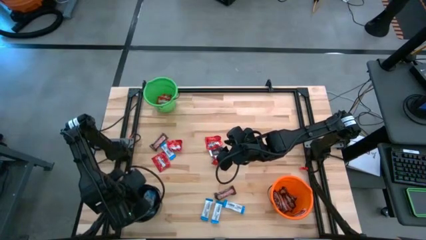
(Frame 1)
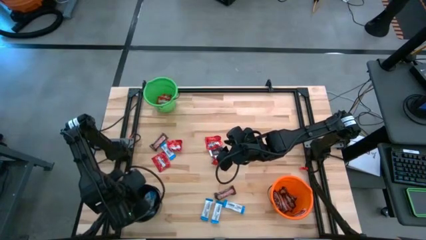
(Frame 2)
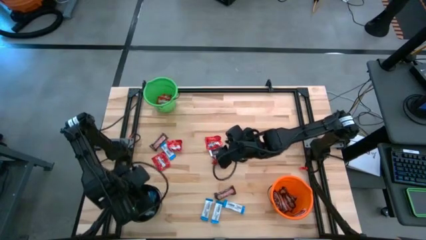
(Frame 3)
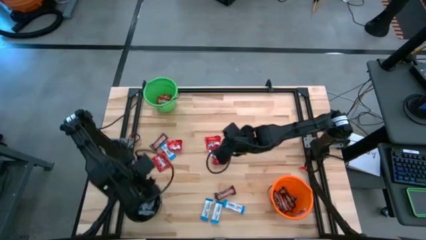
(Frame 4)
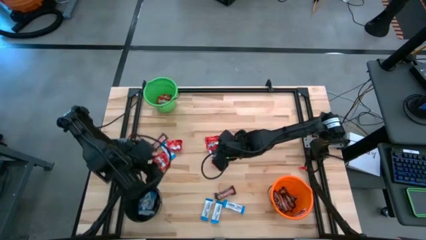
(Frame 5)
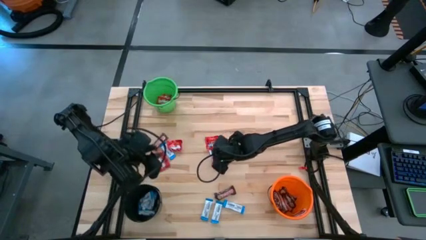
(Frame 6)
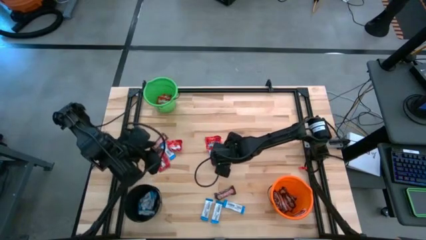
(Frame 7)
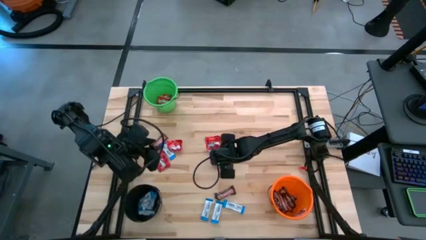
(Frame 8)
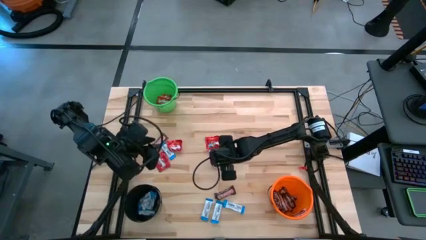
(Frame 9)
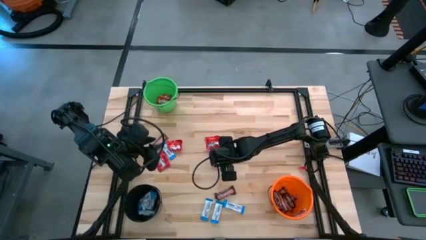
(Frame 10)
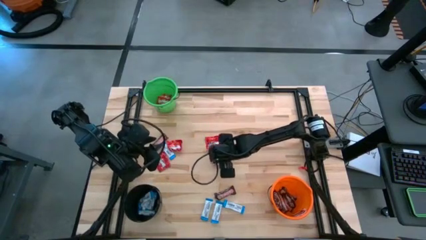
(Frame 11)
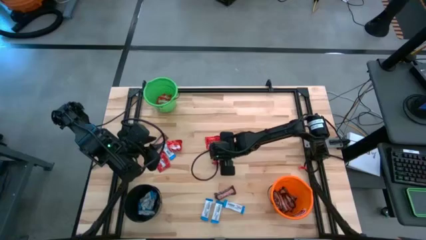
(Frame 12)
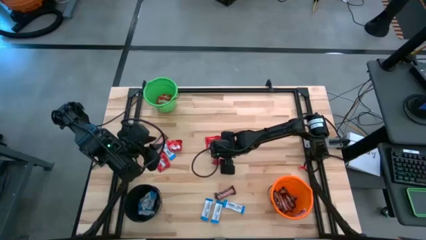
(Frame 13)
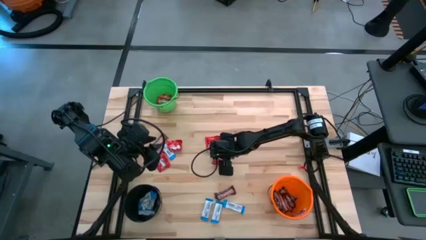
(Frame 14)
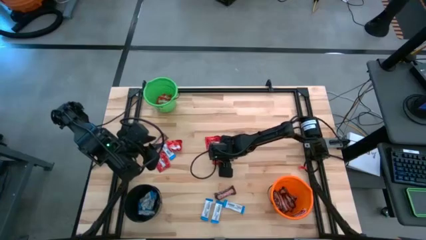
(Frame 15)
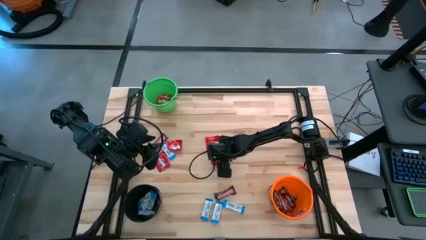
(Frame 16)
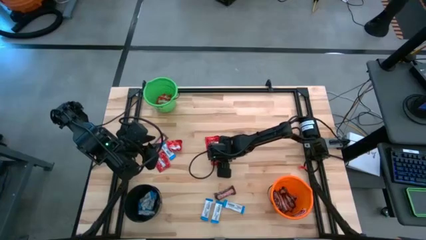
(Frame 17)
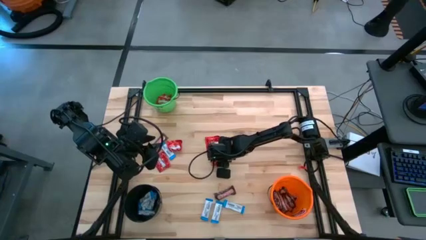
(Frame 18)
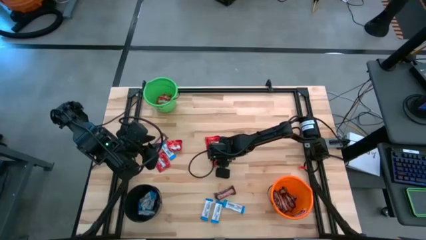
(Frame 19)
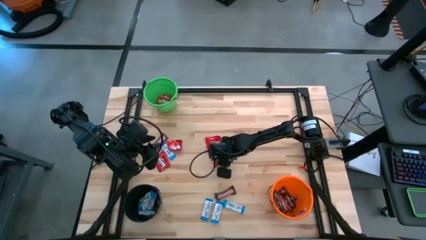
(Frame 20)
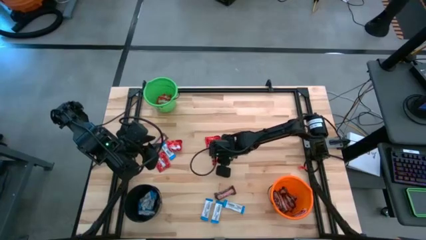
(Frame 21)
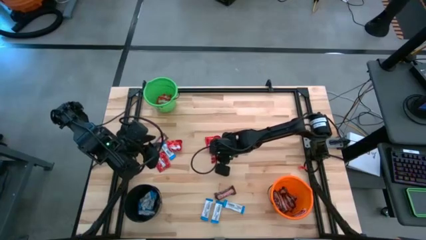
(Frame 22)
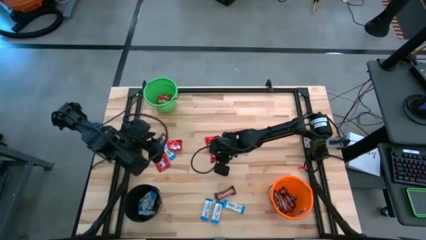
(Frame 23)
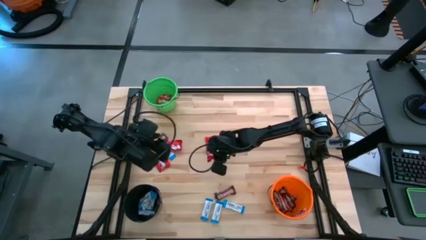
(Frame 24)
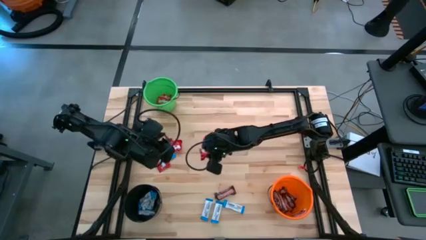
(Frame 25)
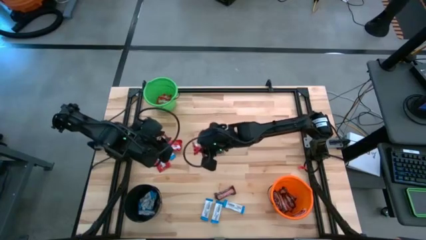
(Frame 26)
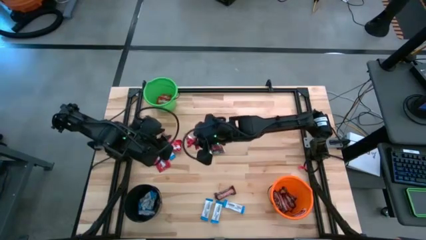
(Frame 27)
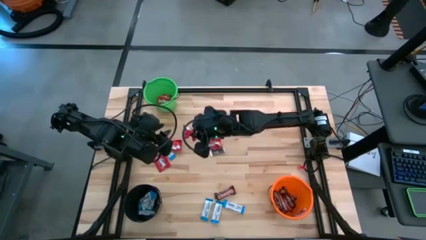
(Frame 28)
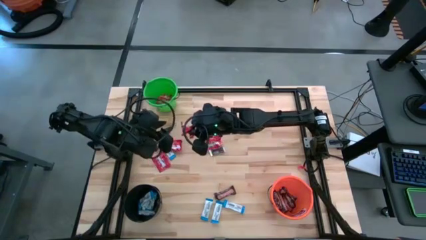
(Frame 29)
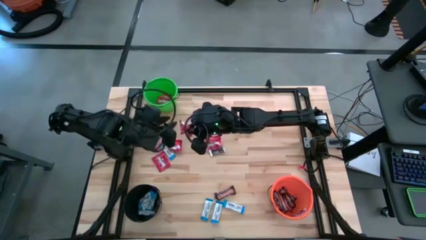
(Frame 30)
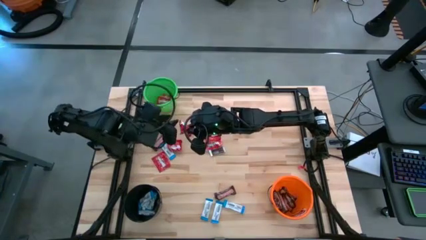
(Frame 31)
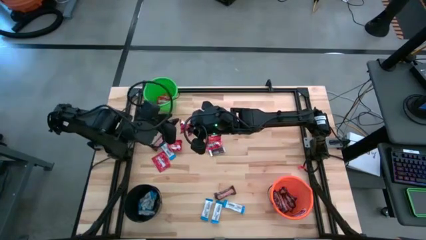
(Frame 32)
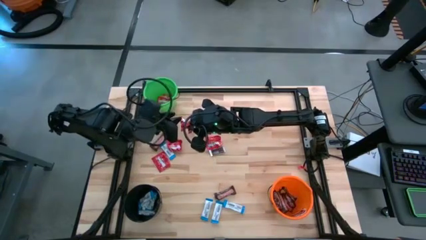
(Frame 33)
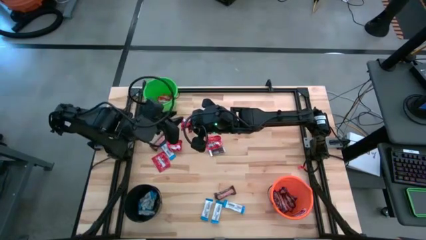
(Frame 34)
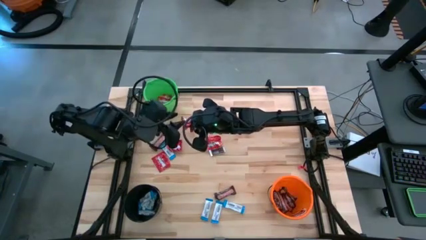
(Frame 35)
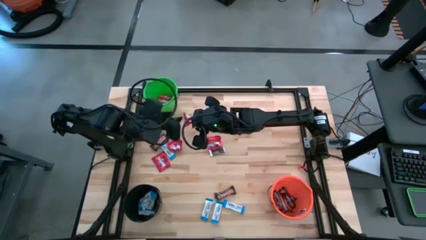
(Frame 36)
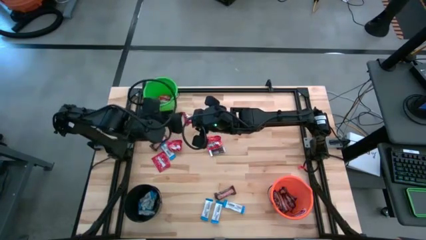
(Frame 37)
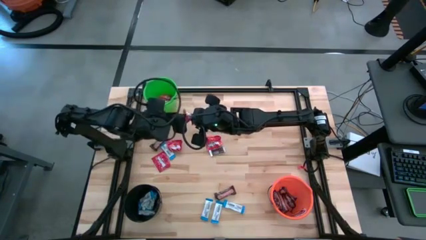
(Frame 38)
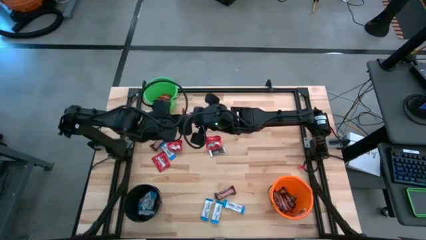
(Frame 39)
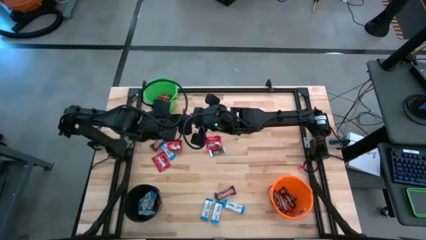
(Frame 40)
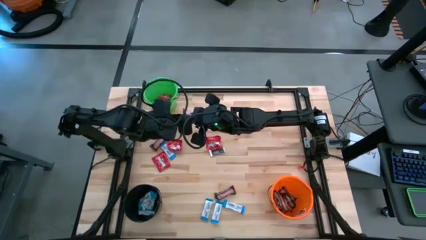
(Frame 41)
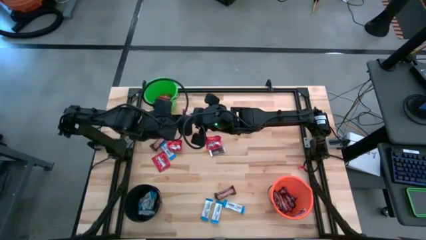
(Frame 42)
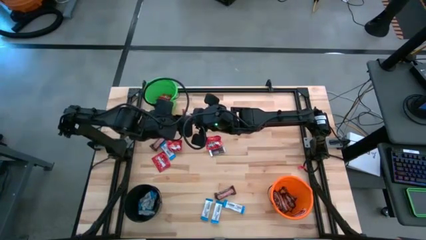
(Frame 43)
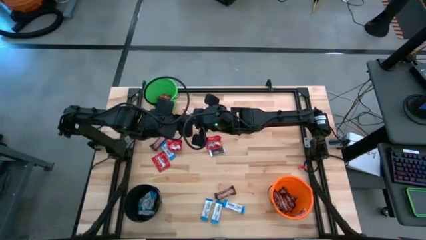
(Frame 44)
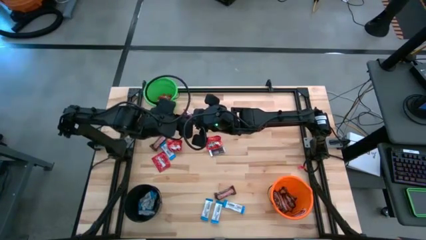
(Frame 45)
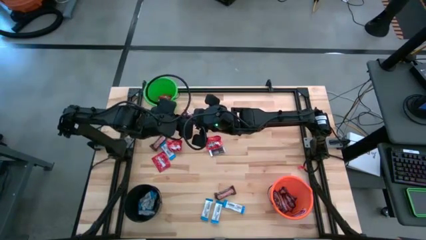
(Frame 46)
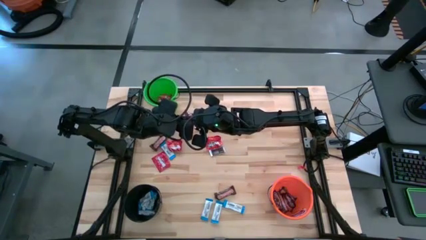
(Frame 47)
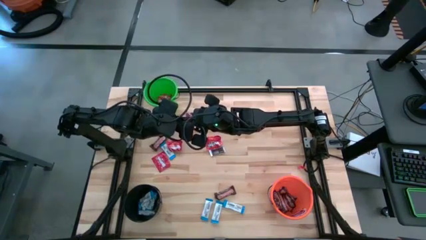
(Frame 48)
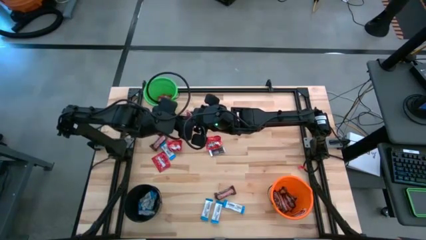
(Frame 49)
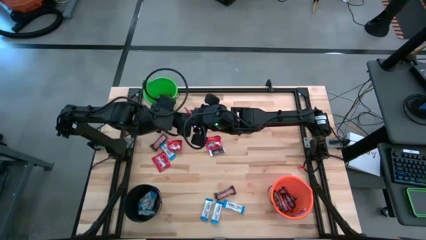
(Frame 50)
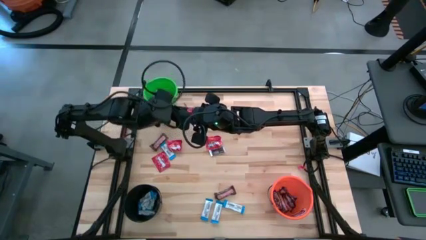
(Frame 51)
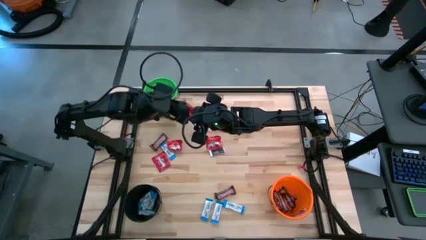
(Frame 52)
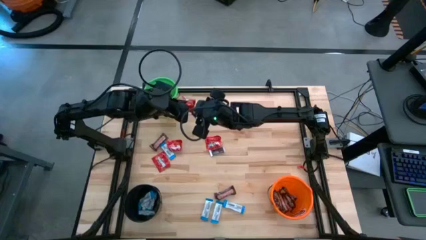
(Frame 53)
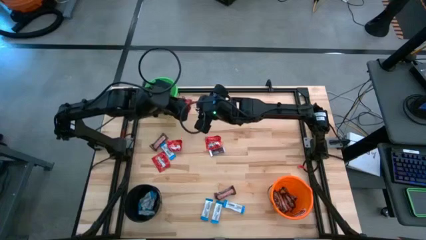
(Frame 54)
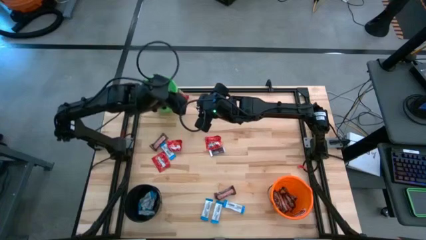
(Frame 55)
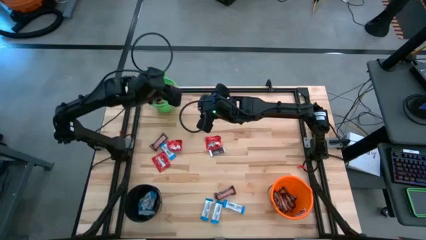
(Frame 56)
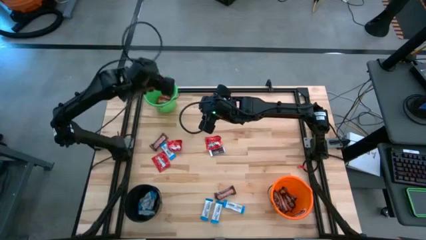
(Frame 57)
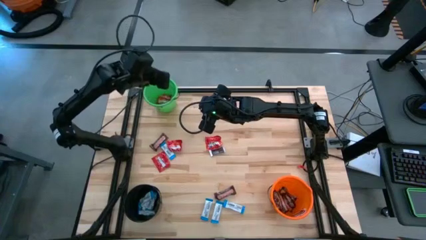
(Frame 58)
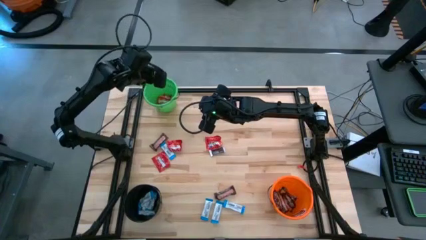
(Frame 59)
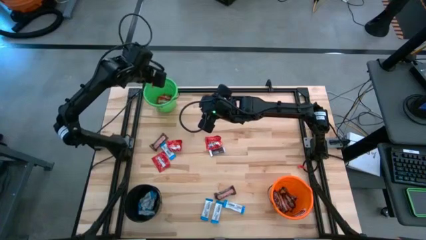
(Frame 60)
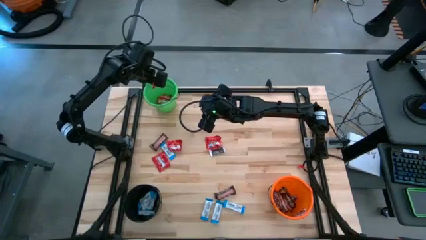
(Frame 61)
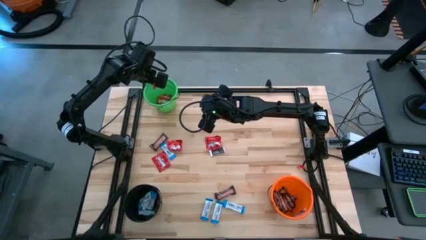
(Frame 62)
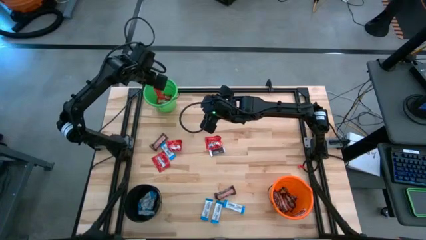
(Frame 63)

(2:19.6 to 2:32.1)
Task: Sort candy
Put the red candy into the green bucket

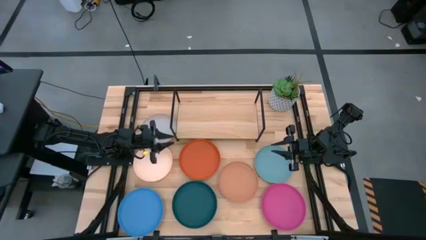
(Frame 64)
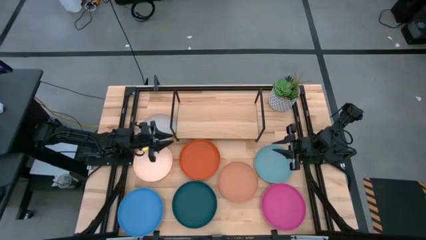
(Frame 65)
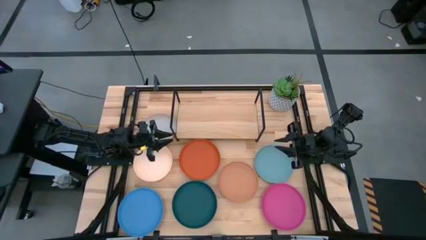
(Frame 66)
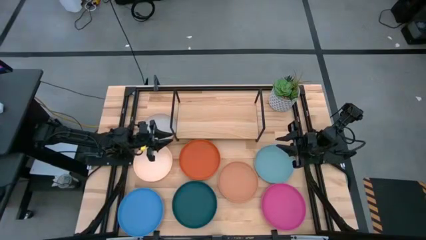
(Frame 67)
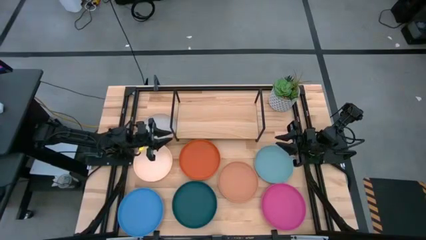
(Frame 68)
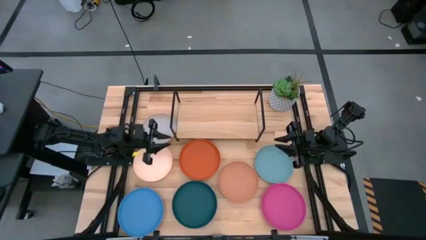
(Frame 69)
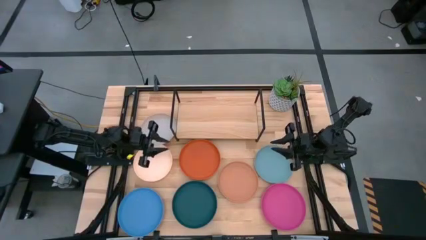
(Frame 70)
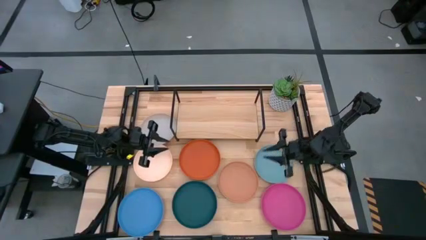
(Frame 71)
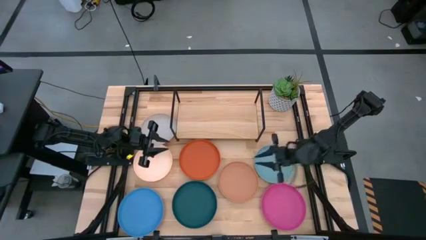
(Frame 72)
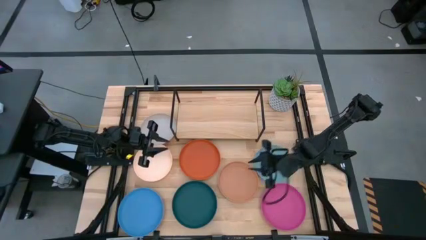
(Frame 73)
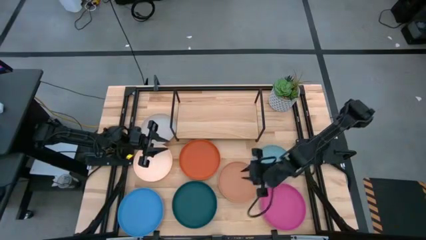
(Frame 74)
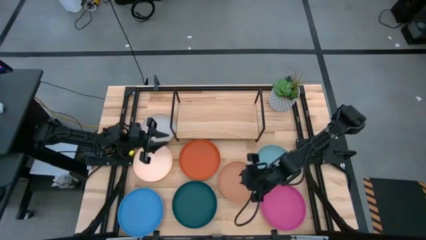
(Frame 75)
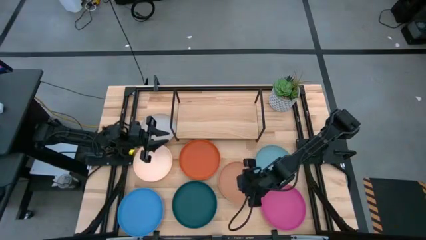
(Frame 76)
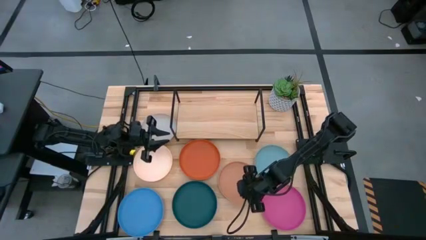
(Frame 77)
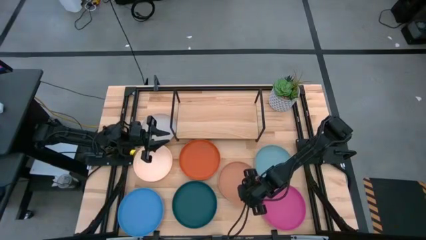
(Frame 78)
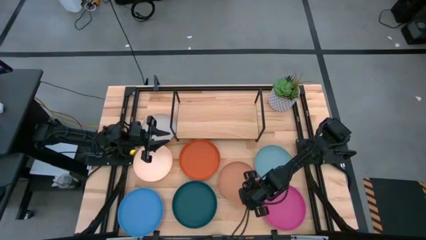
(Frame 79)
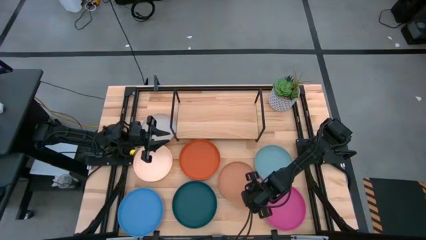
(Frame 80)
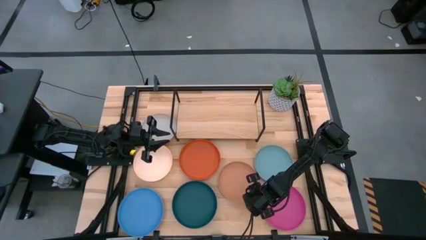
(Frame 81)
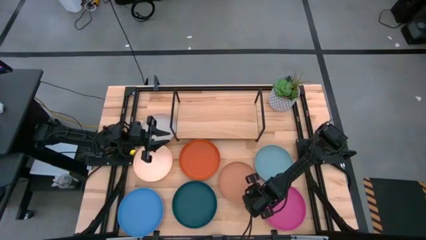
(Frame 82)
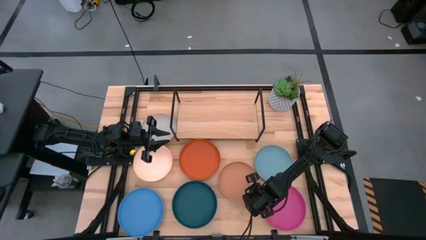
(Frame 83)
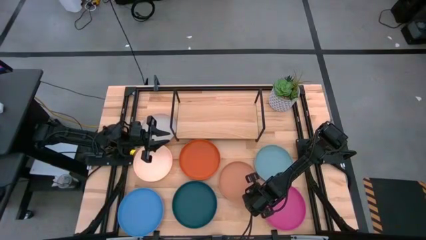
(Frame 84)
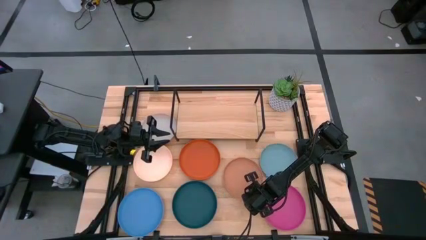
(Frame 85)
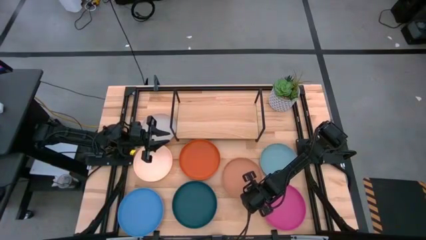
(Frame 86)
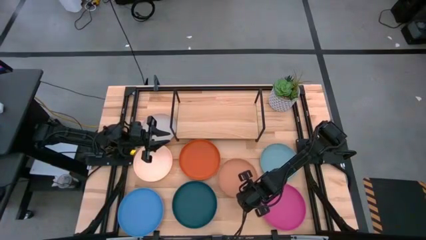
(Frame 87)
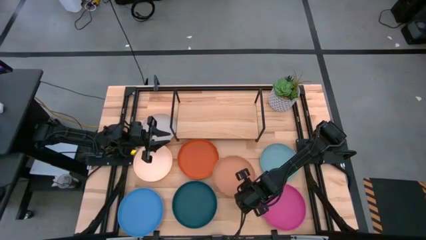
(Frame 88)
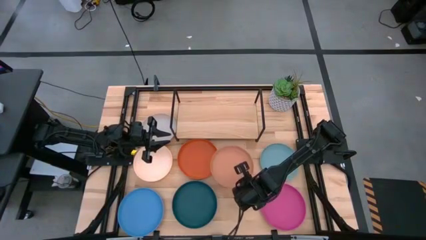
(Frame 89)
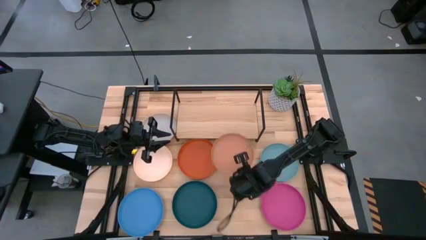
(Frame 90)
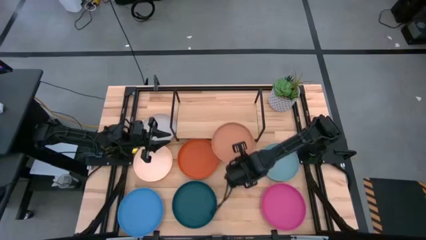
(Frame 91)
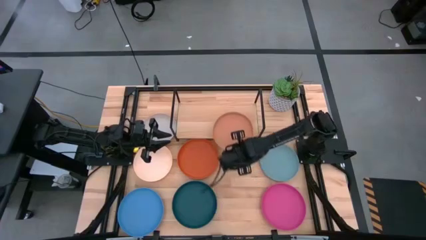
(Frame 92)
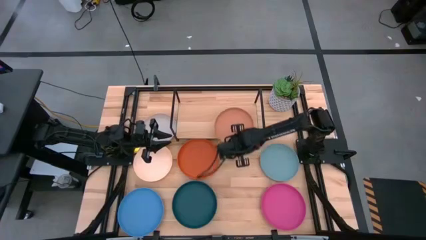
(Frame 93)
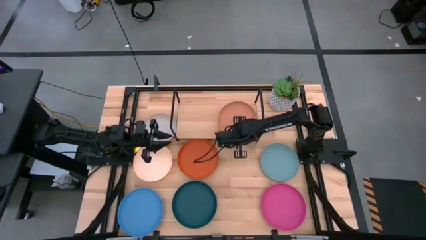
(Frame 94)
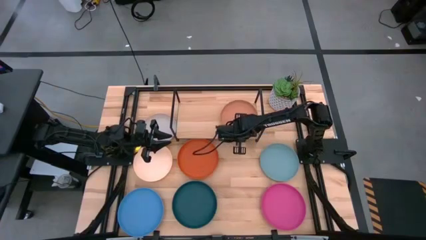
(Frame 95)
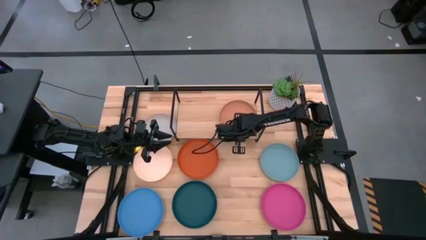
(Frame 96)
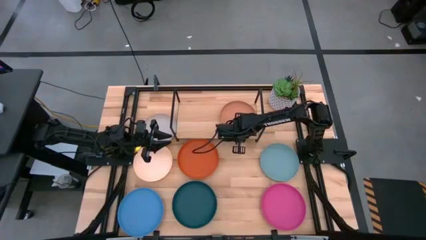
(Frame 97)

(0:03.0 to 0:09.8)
Task: Place and stack plates onto a shelf
Put the brown plate on the shelf
